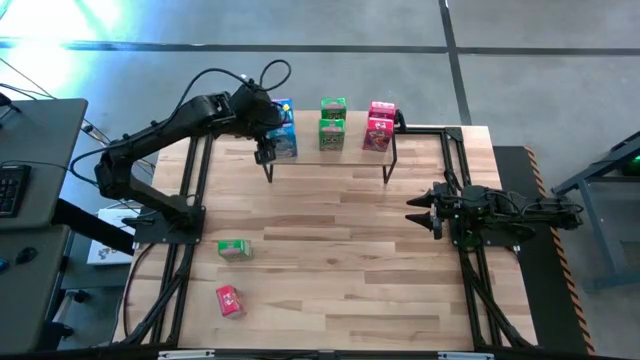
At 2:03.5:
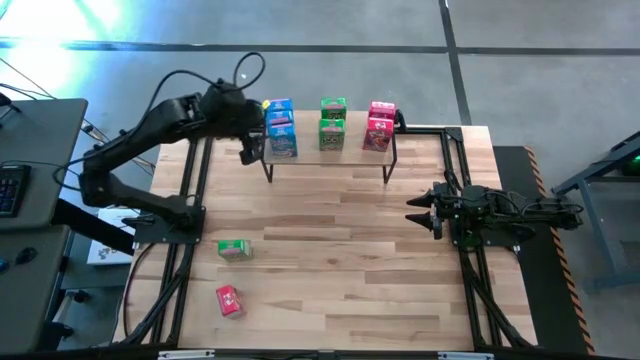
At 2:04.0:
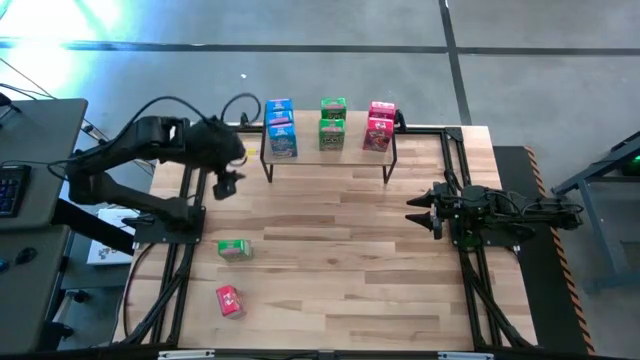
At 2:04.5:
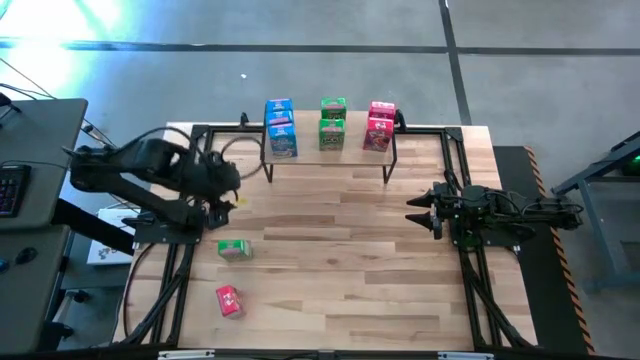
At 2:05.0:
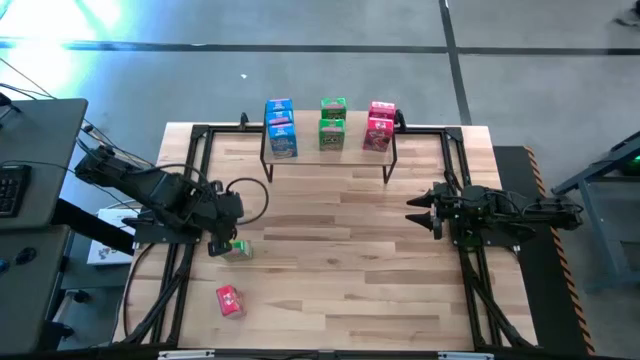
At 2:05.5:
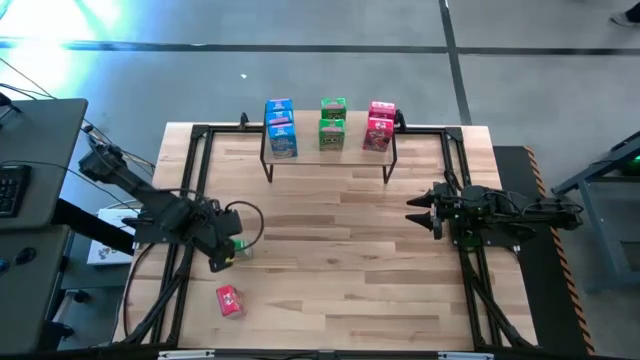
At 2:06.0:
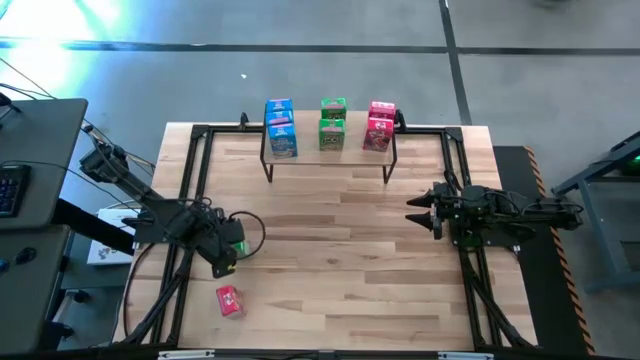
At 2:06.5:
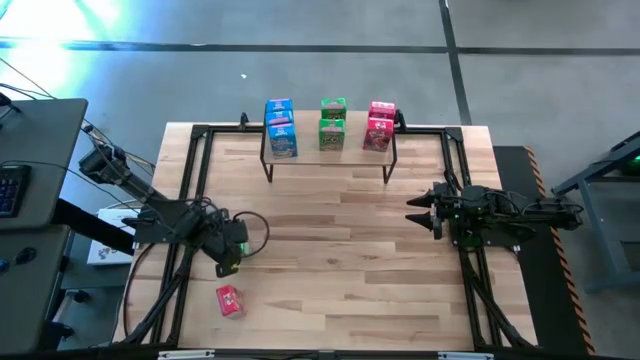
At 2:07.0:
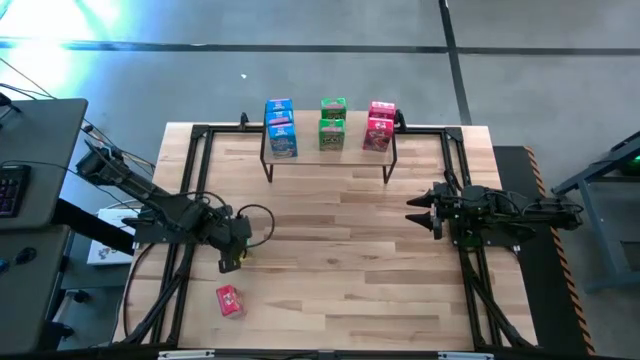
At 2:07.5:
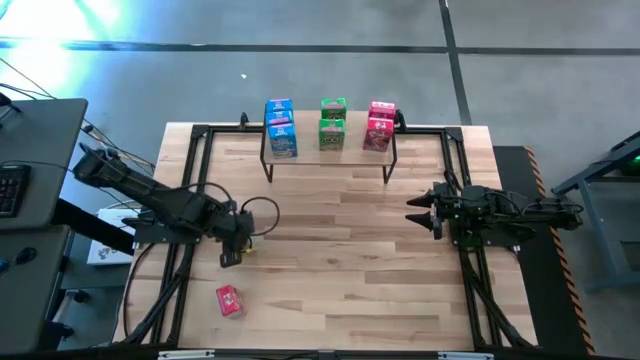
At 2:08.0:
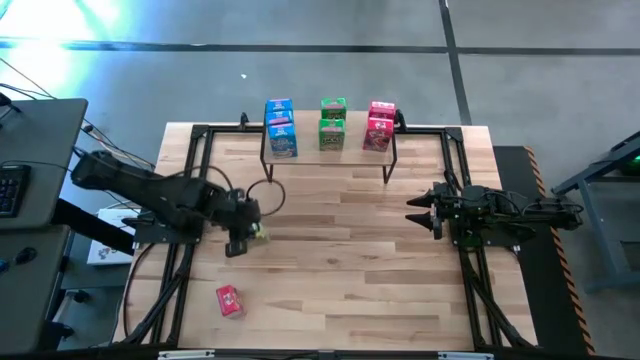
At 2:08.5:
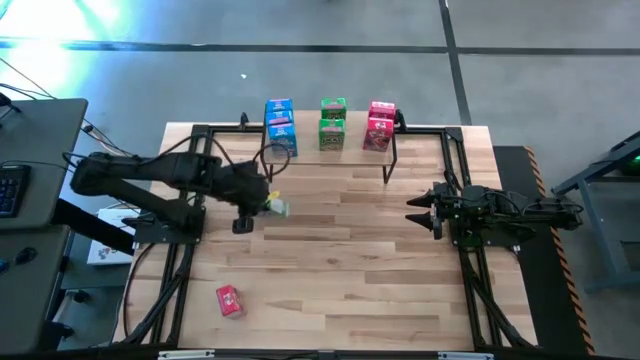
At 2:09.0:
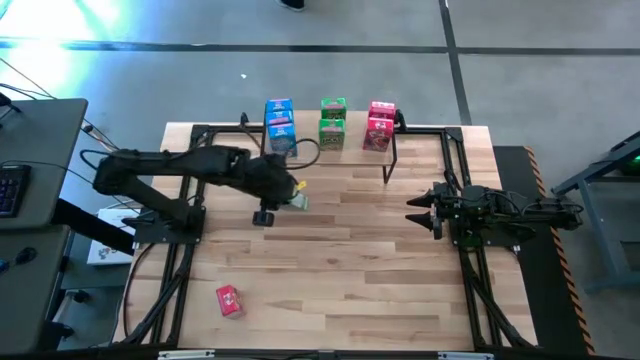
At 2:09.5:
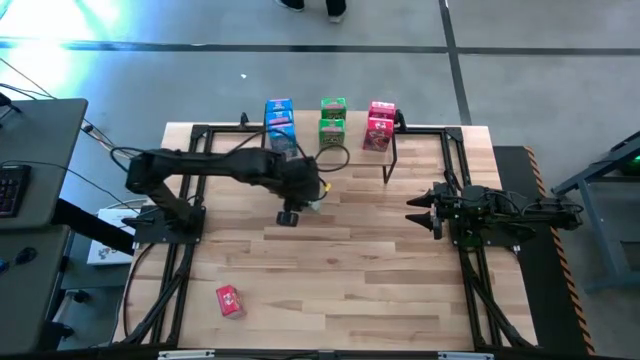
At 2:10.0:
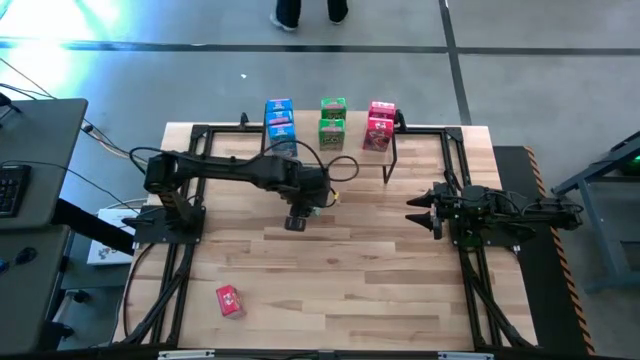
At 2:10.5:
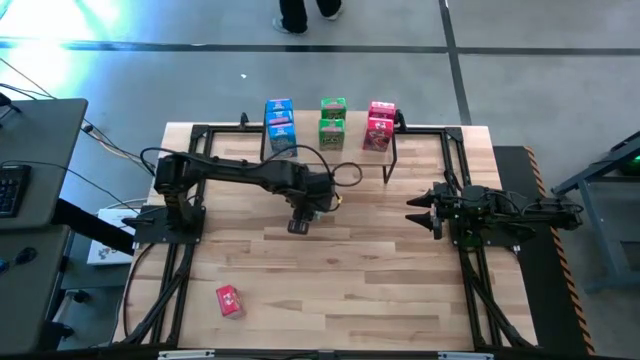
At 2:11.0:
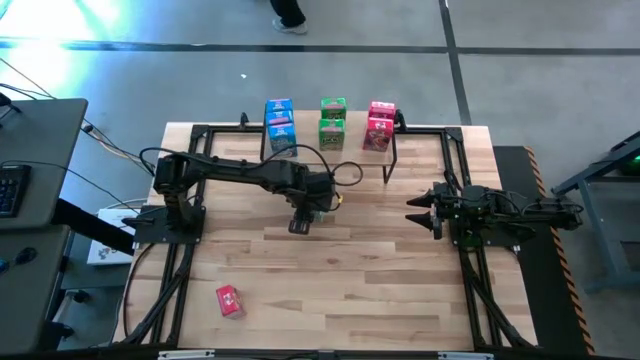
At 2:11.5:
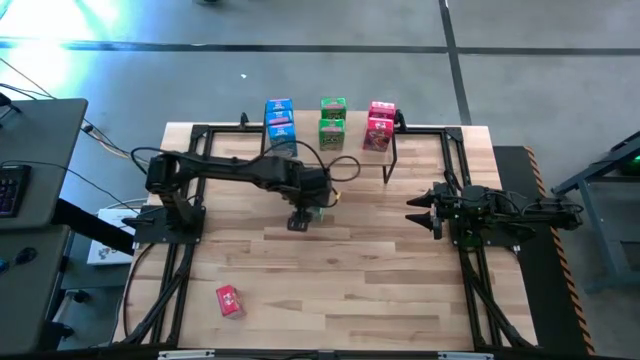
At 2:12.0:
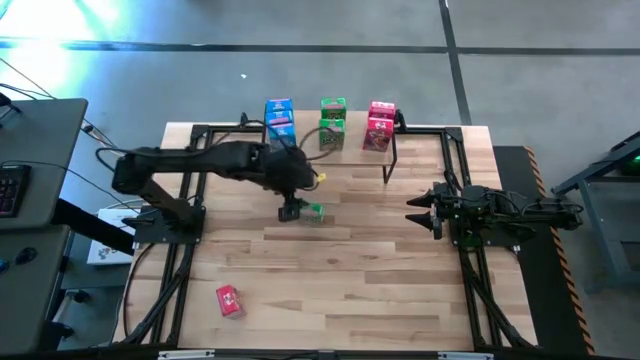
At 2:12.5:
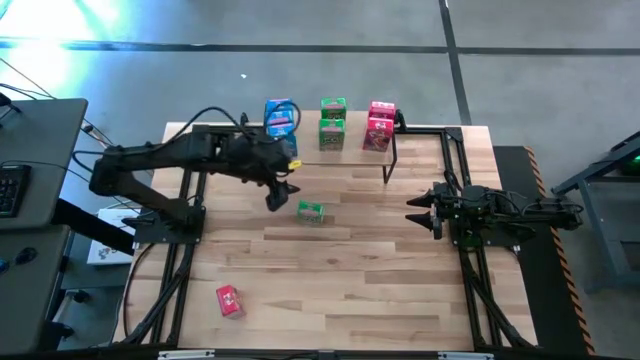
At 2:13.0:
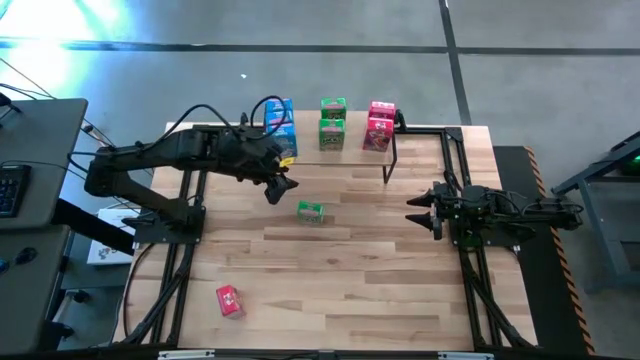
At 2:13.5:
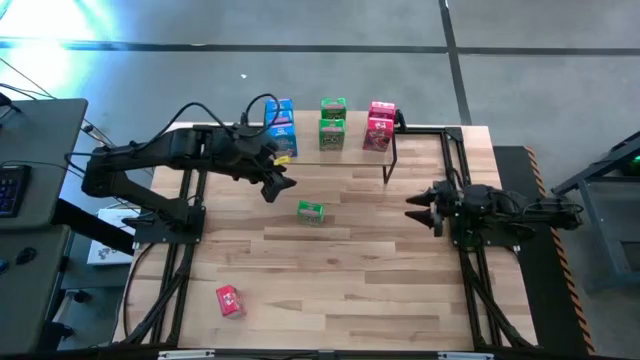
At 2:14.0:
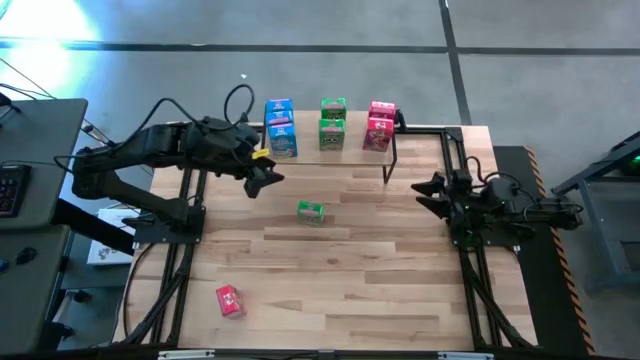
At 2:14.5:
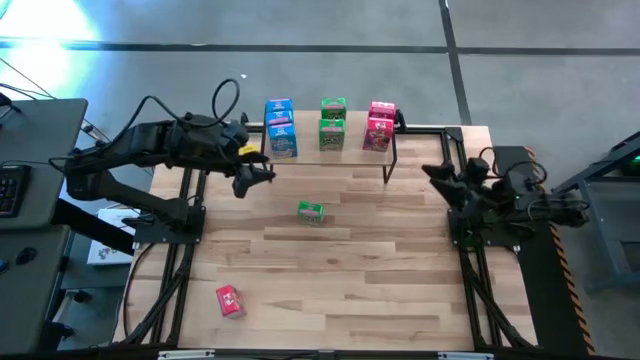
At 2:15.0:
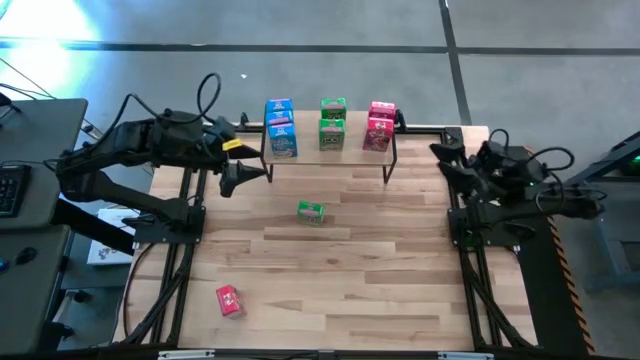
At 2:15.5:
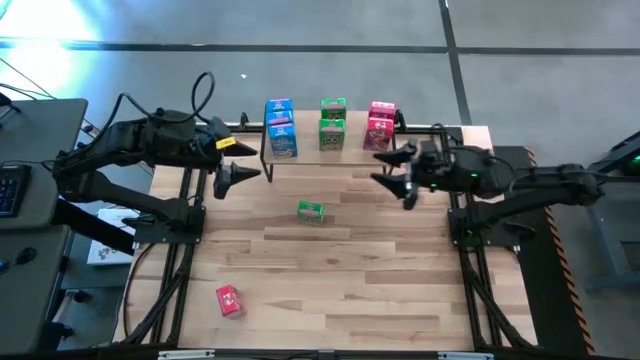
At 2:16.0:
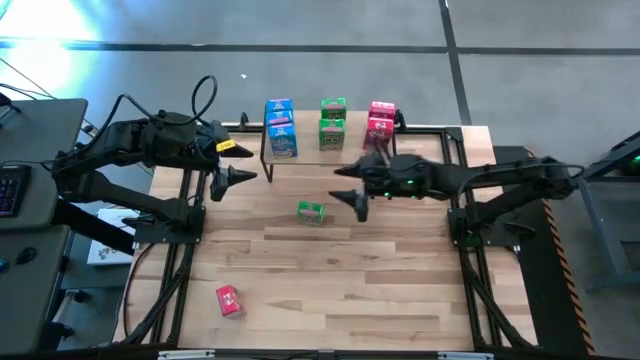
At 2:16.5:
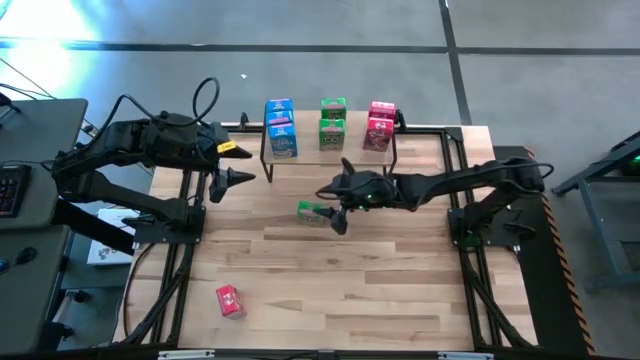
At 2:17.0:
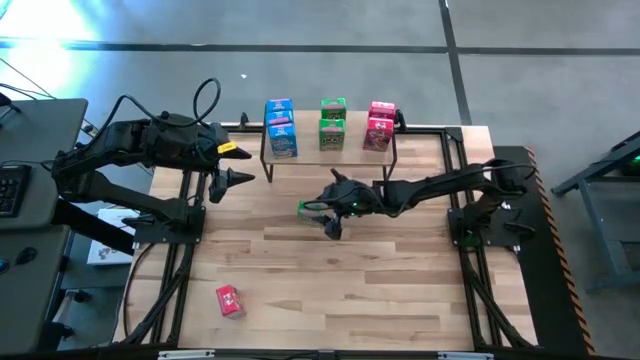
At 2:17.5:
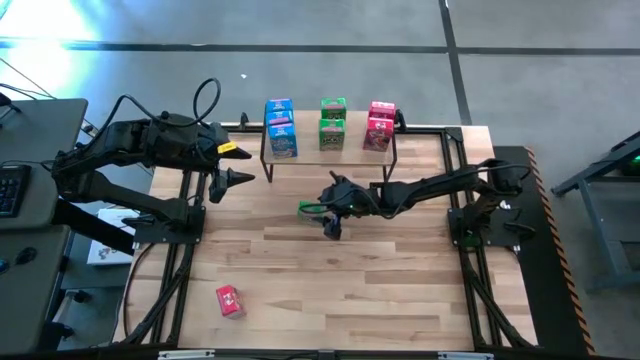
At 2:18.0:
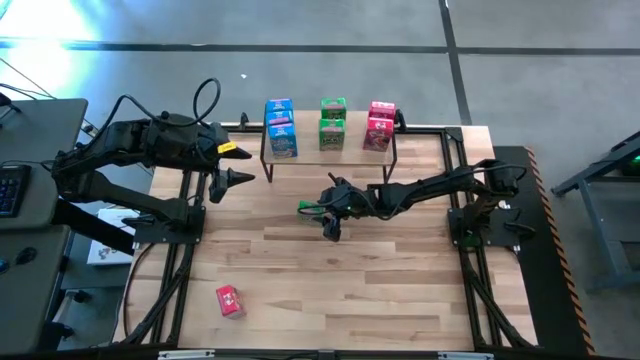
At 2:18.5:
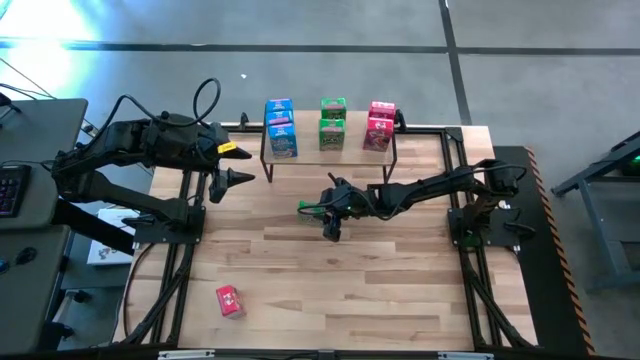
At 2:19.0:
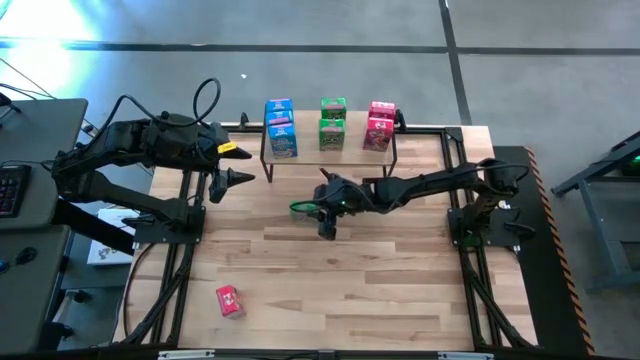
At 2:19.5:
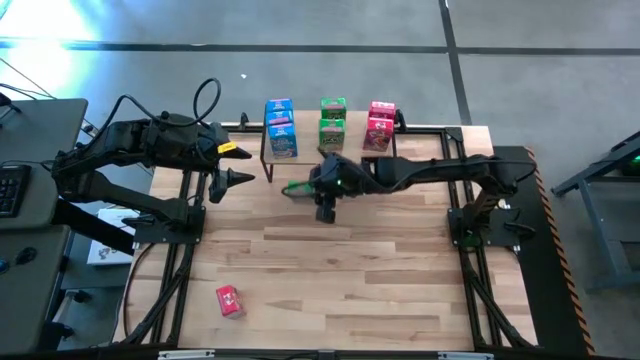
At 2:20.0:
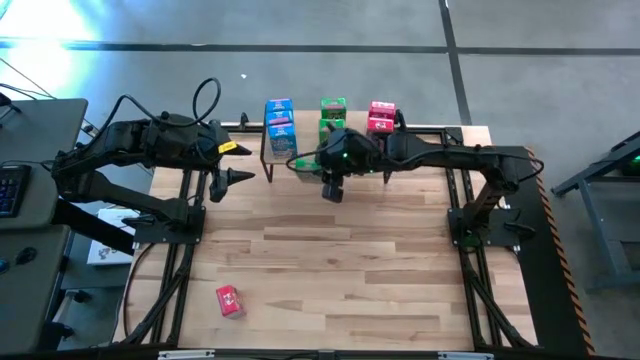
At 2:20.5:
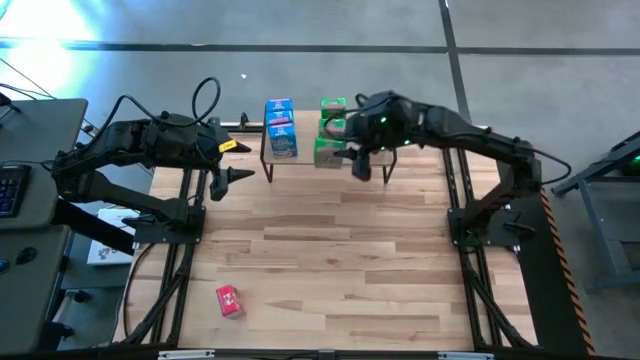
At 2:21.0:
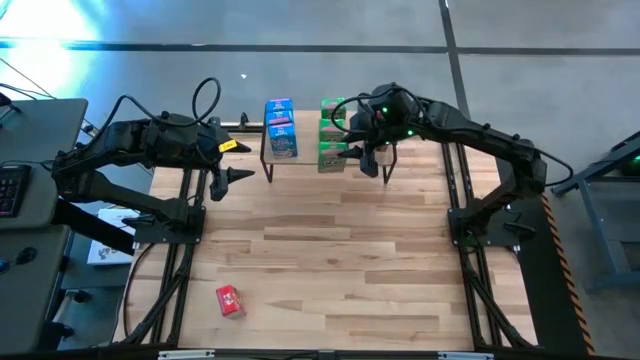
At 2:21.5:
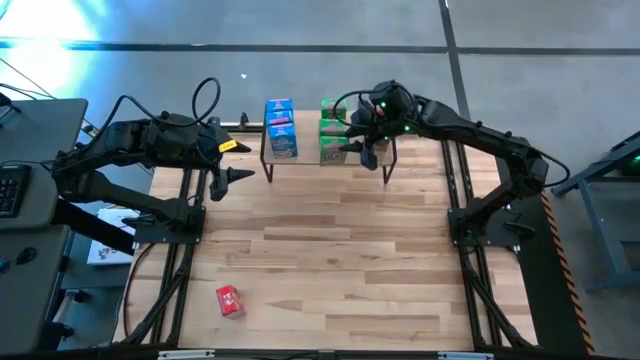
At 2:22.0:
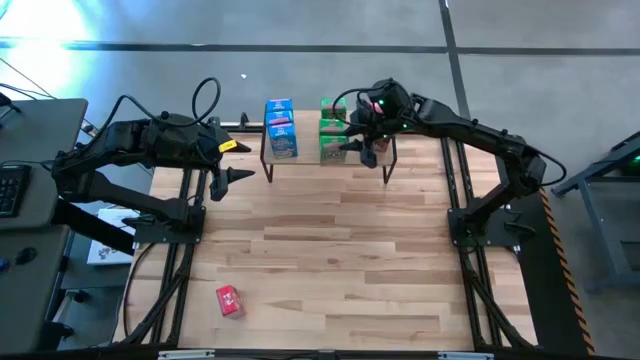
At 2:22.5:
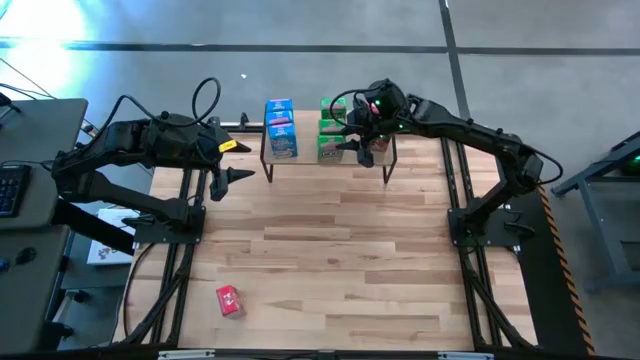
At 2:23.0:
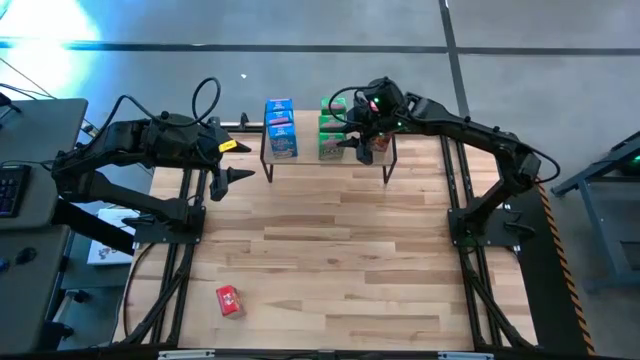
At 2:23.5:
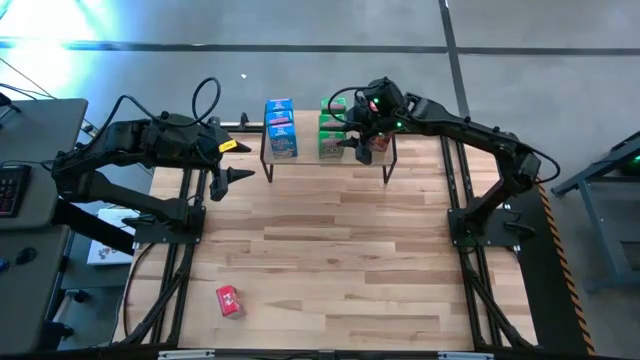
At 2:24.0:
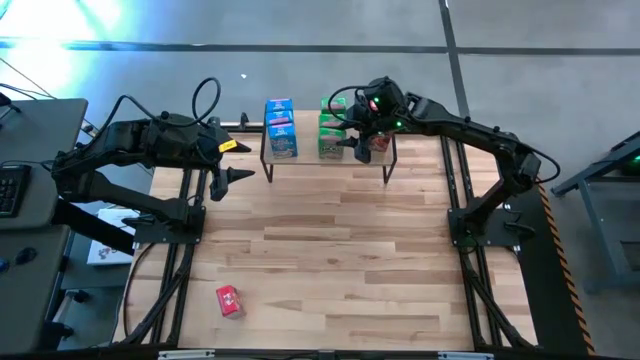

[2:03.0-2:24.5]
Task: Stack cereal on shelf
Put the green cereal box on the shelf aligned with the other green cereal boxes

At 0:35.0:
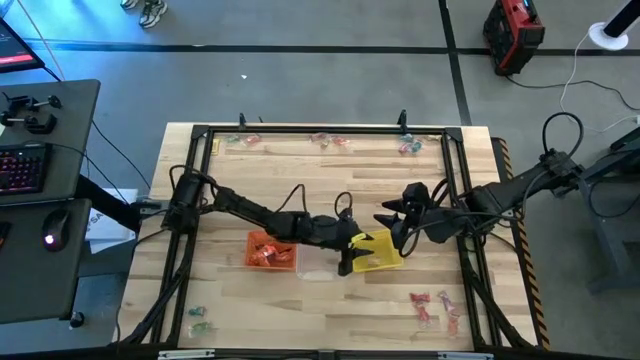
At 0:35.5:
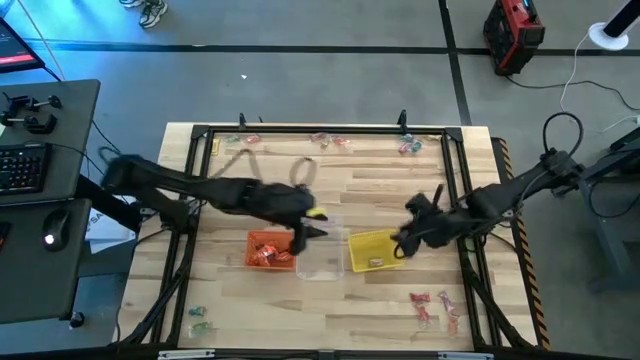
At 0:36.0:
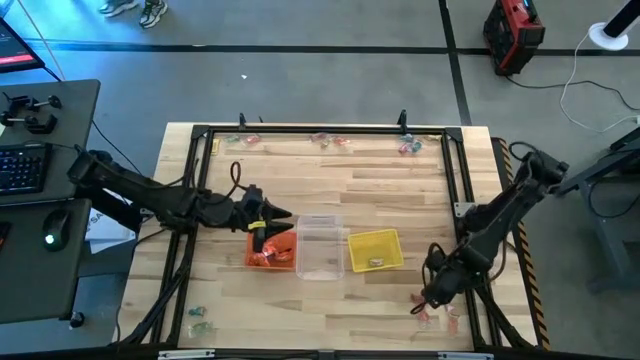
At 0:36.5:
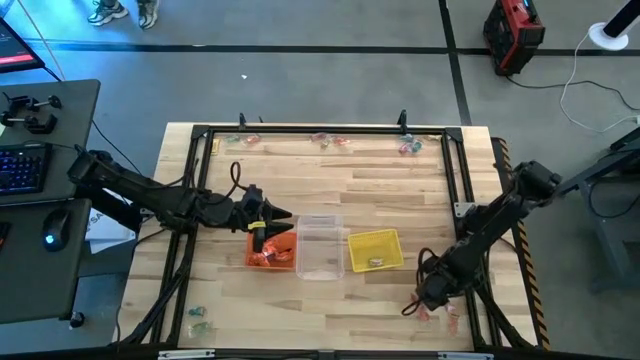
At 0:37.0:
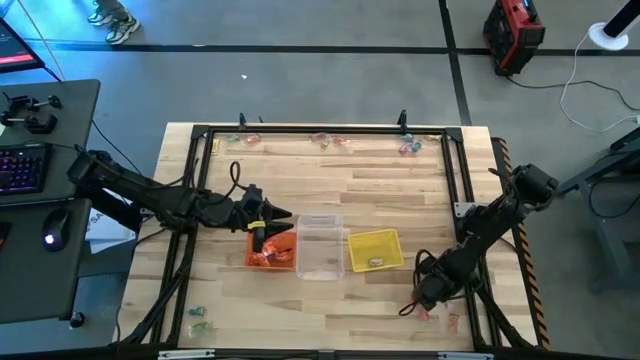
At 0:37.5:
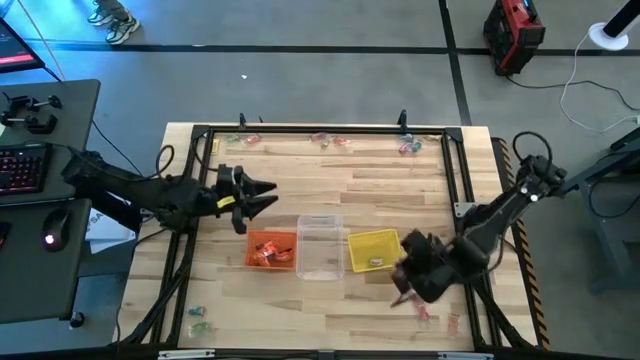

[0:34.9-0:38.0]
Task: Sort candy by brand, put in halloween buckets
Put the pink candy into the yellow bin
